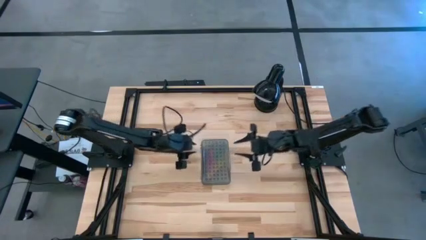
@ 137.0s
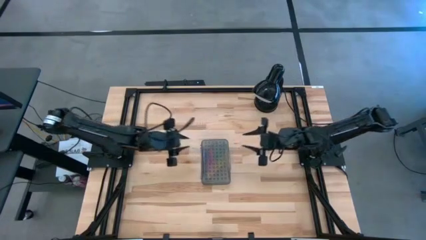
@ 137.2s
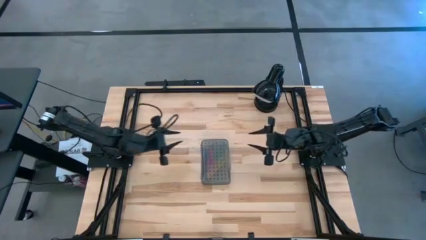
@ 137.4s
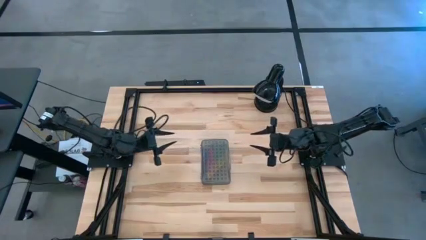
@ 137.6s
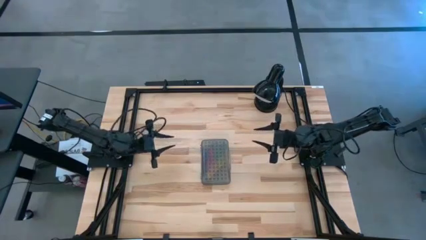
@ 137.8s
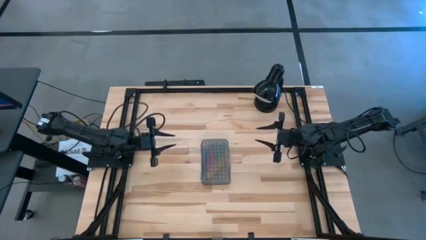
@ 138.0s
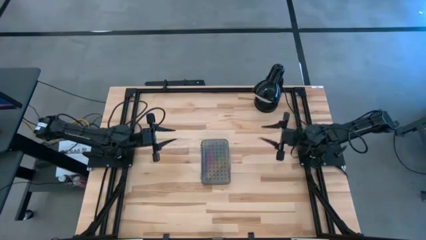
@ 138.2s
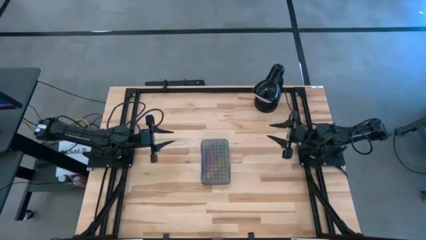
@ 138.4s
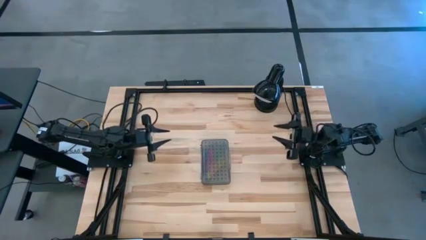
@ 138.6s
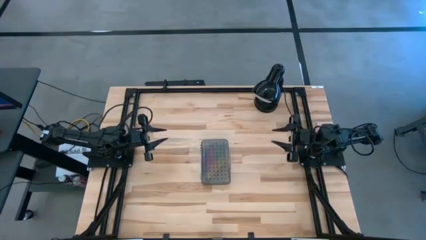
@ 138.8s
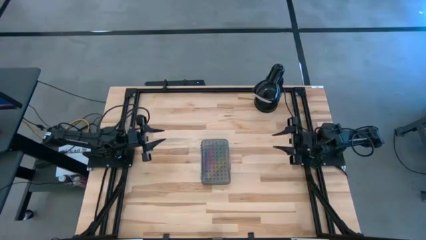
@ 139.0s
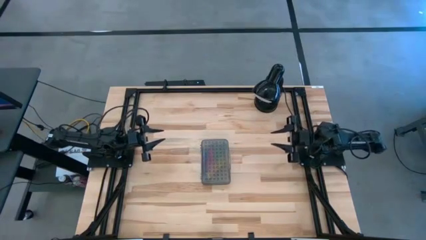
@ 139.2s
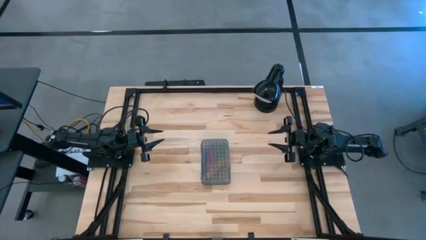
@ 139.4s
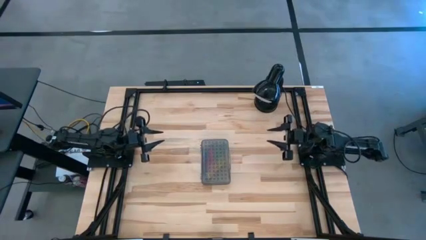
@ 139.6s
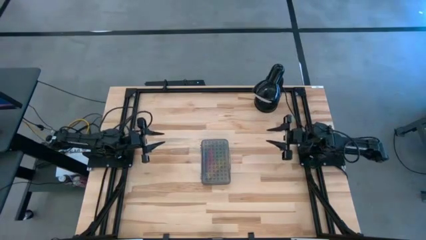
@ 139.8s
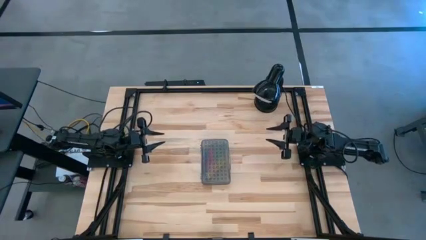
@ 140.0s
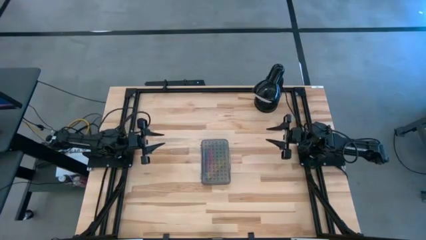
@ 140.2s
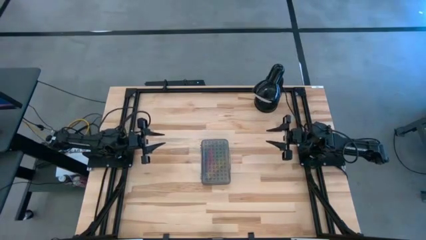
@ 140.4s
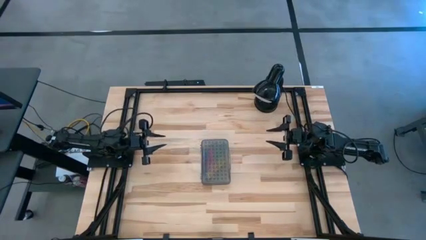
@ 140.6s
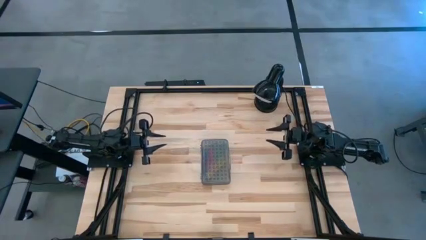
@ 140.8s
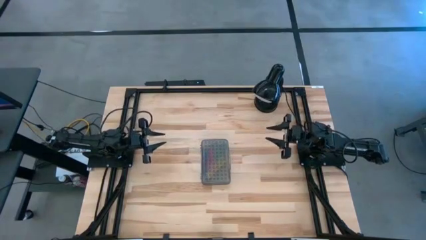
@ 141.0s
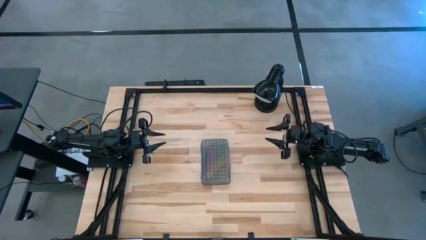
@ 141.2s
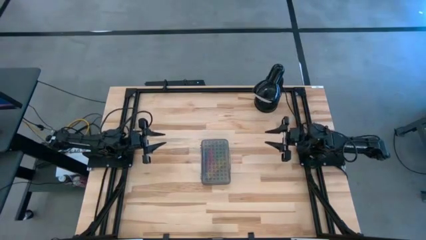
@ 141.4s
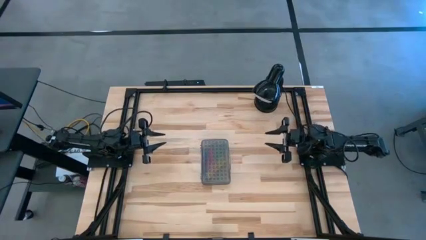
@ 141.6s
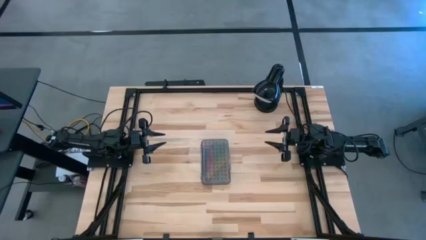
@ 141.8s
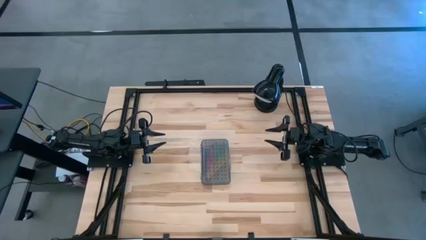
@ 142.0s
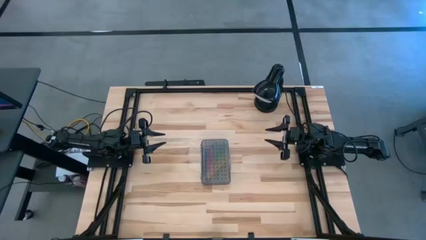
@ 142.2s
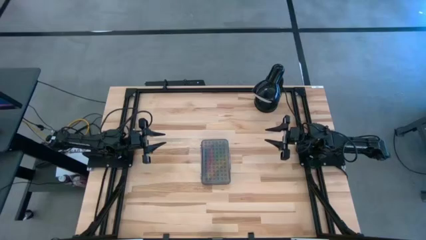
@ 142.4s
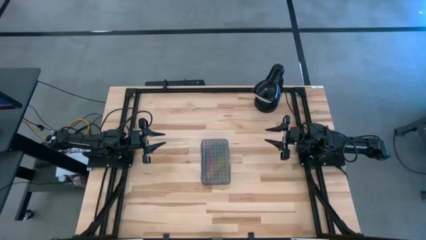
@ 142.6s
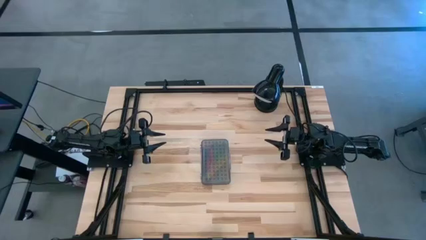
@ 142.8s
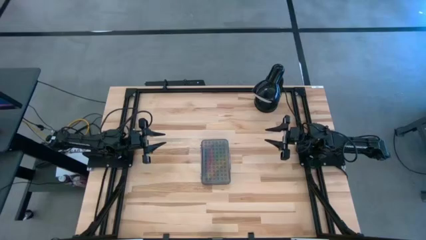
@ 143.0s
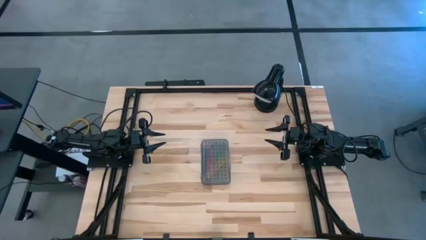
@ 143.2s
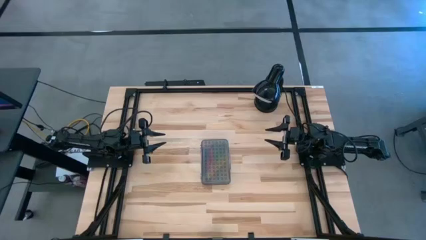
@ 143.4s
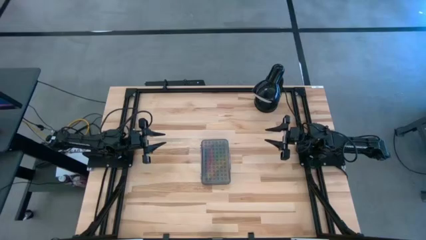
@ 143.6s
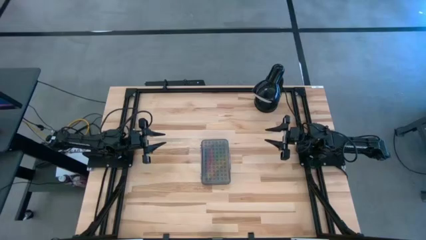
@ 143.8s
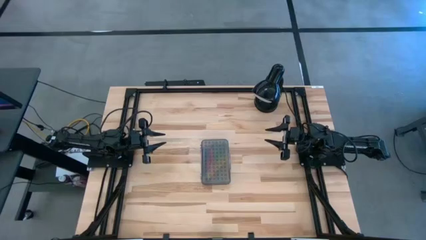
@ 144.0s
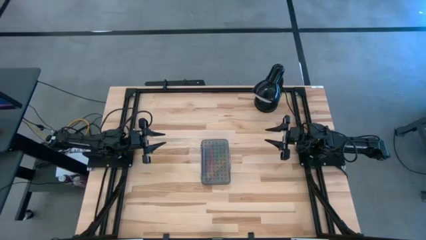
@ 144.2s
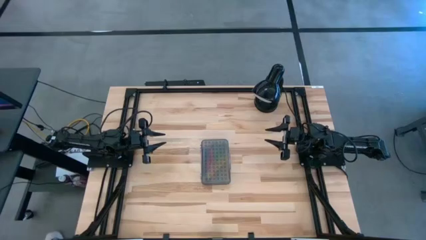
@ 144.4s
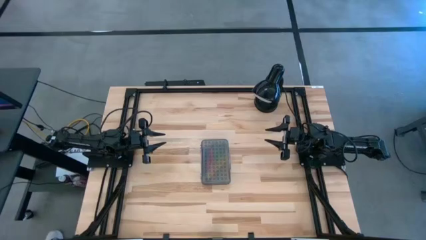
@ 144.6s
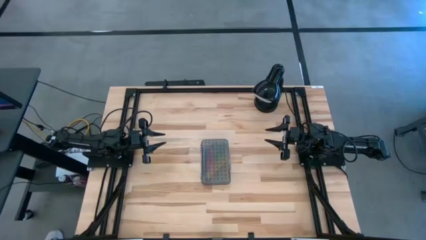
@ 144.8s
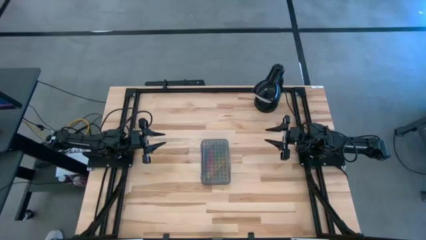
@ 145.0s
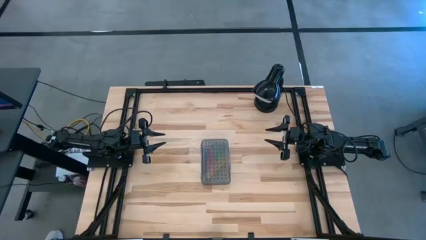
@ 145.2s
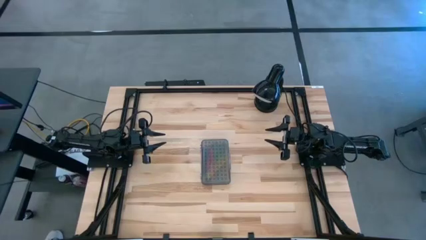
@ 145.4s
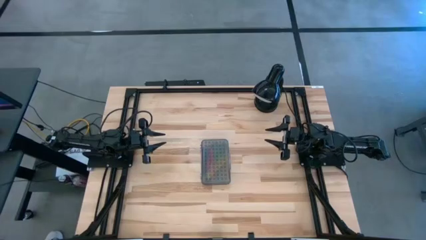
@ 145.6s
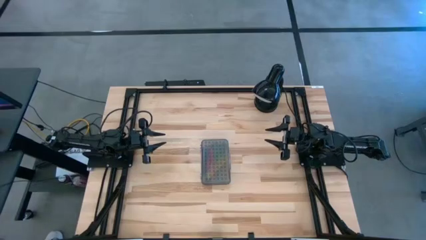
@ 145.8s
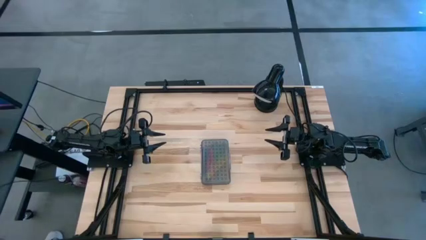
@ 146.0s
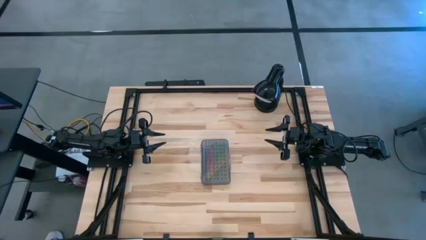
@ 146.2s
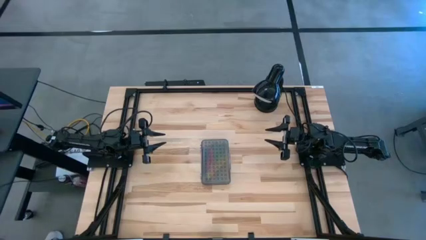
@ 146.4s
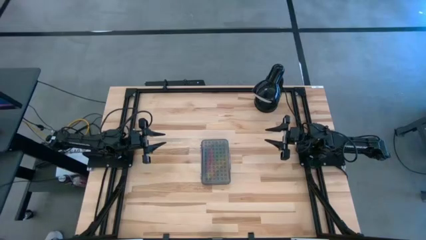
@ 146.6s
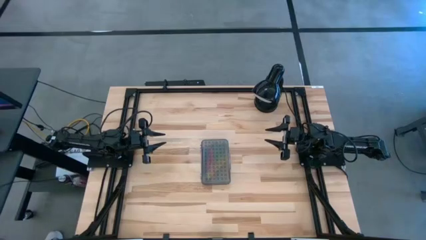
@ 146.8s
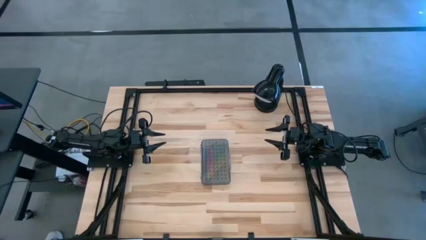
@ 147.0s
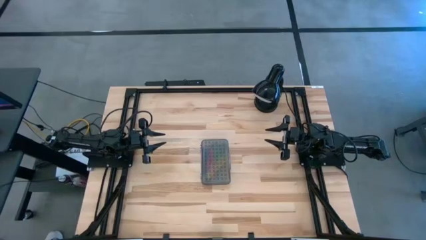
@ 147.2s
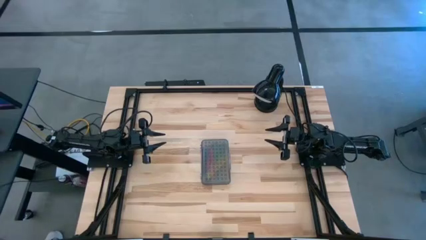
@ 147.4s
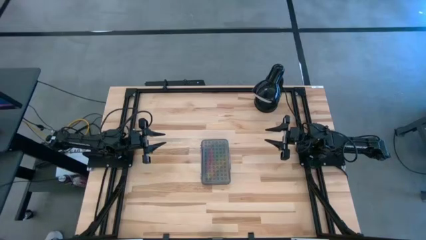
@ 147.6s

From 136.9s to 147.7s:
Task: Pick & place school supplies into a supply box
Return to Home Position

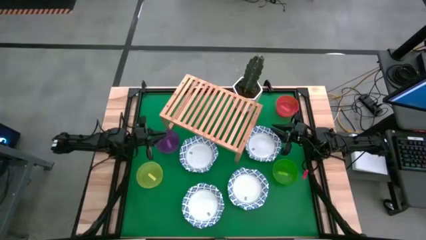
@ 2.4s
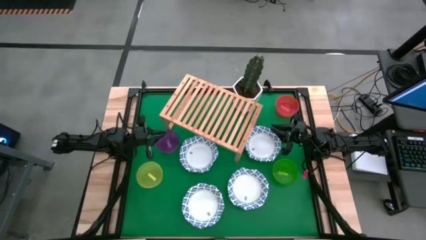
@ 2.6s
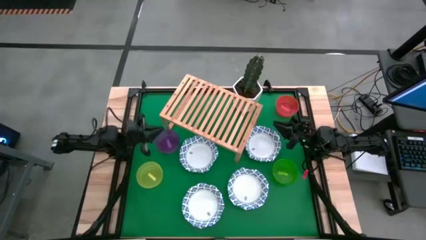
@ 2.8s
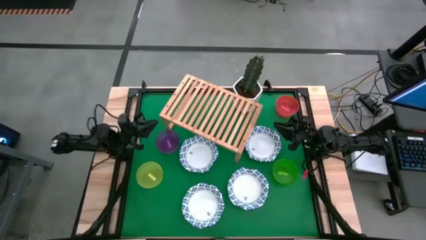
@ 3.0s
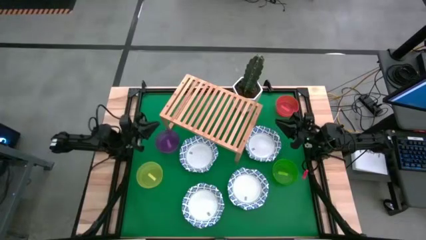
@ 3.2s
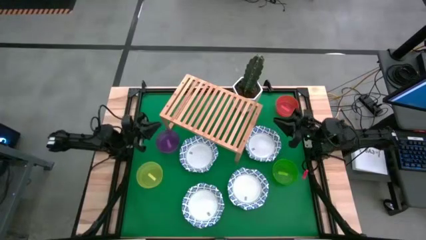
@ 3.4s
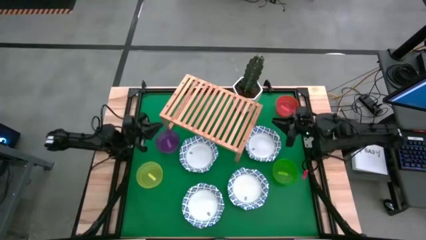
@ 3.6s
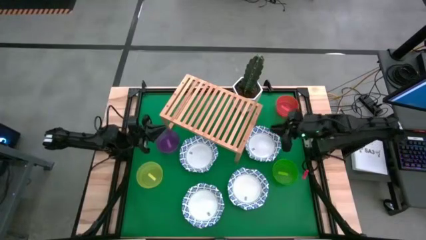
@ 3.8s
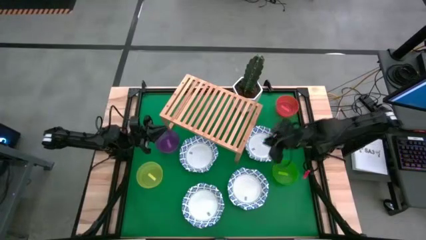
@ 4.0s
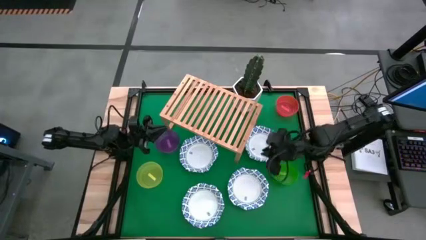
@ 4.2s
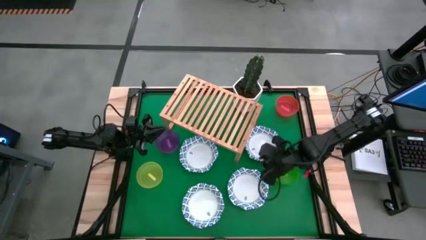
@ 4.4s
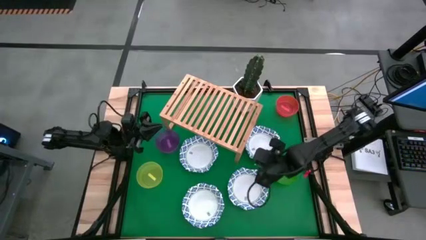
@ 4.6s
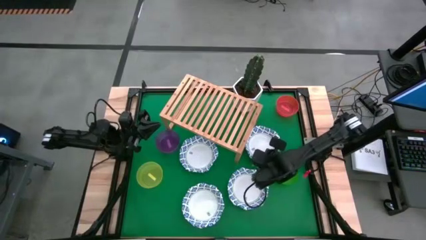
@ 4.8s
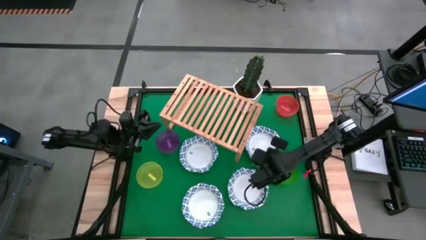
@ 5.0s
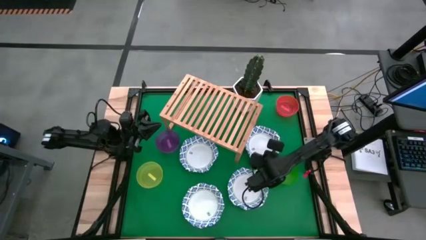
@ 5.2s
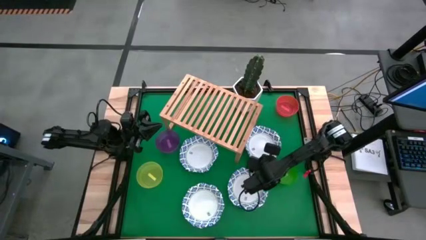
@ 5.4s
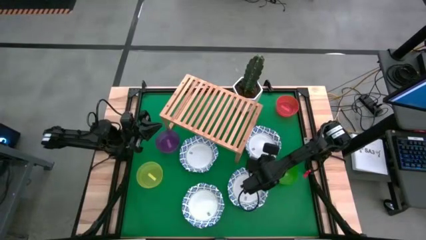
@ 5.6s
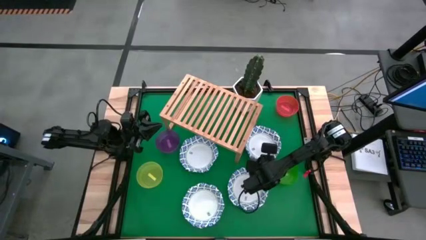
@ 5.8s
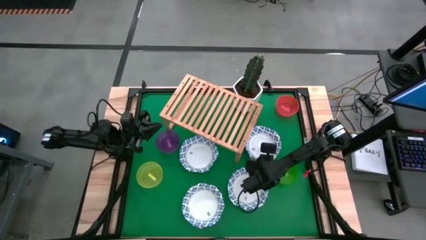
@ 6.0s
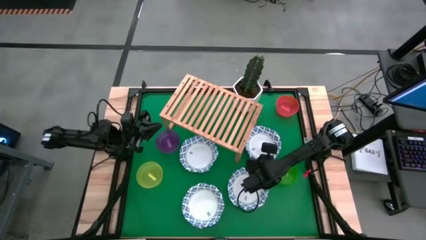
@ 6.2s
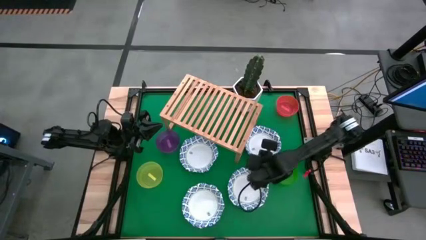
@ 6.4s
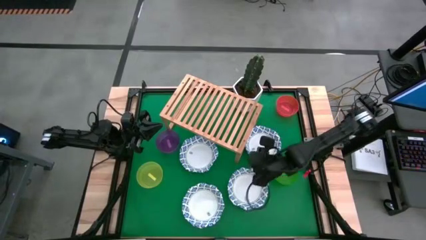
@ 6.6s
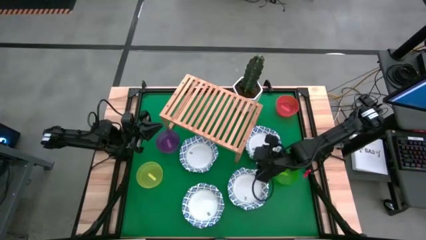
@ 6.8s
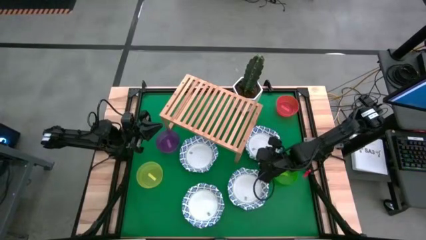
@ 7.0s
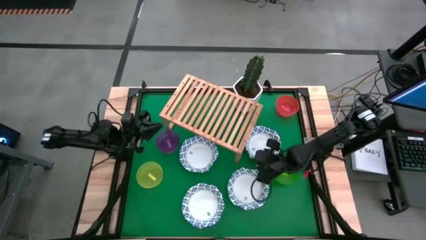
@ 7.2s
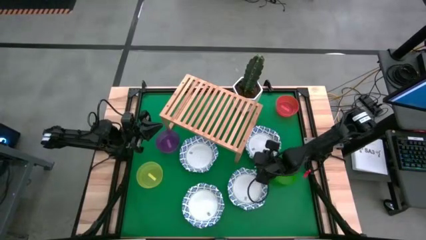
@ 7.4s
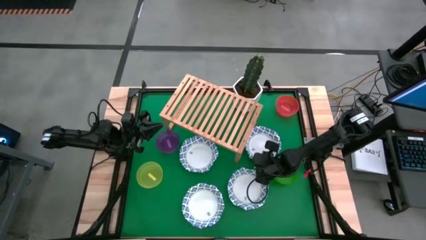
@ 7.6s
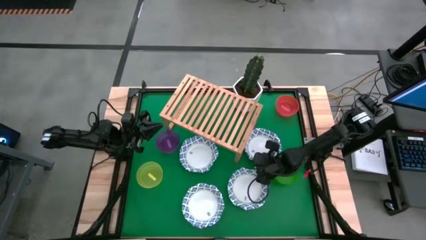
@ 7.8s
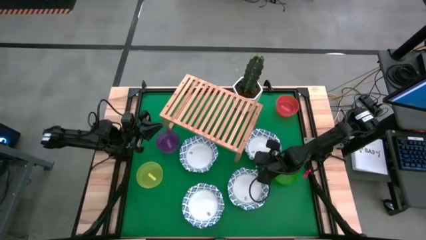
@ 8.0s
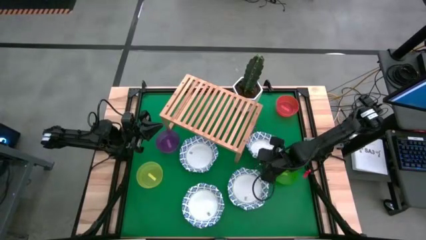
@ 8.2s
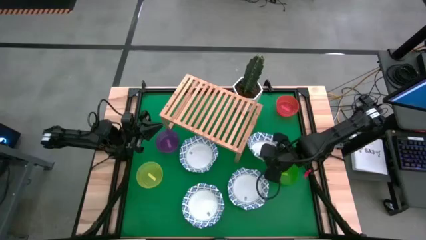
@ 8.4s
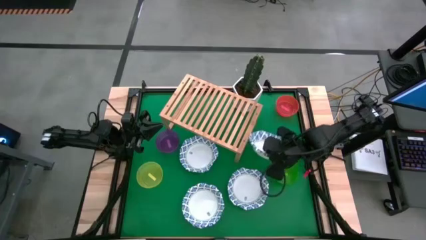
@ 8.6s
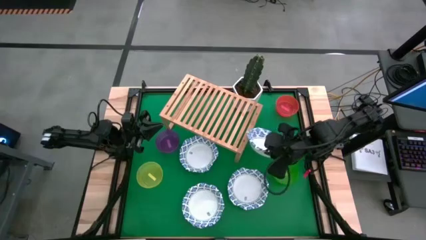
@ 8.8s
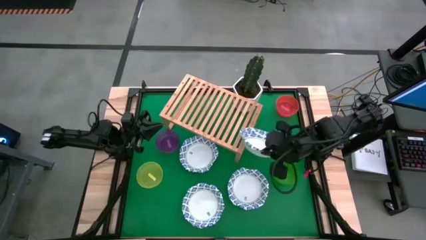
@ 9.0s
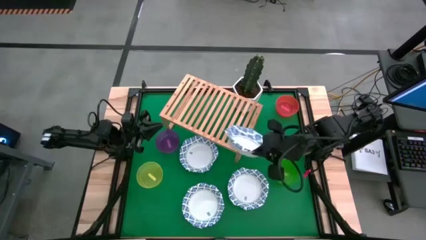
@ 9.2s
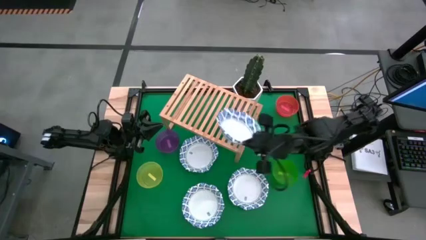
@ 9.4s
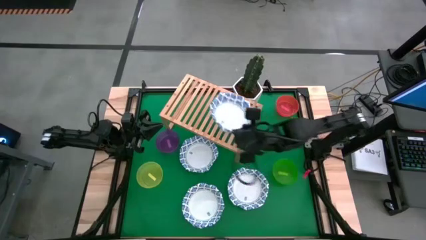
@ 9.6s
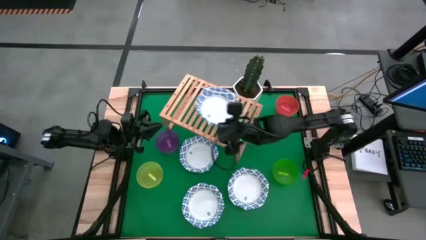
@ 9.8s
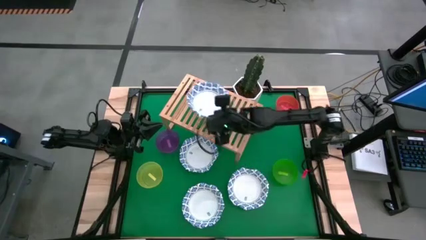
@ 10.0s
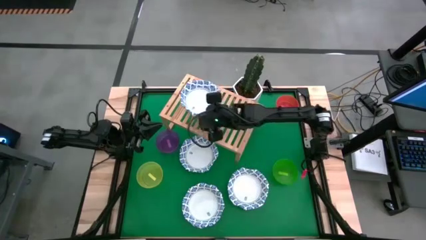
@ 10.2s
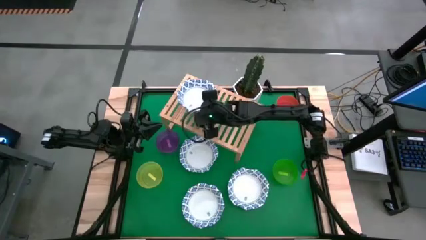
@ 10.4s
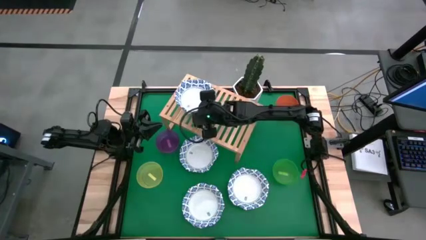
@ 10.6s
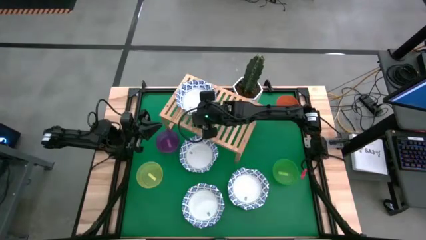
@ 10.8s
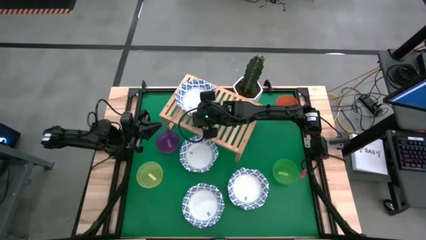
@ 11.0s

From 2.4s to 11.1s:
Task: Place and stack bowls onto a shelf
Put the blue and white bowl on the shelf
